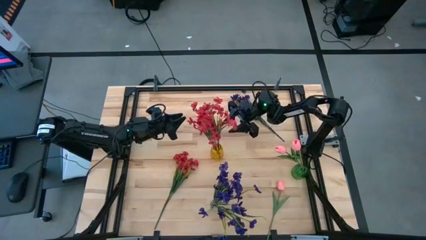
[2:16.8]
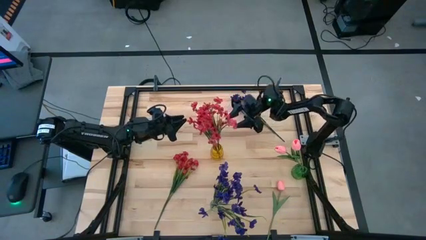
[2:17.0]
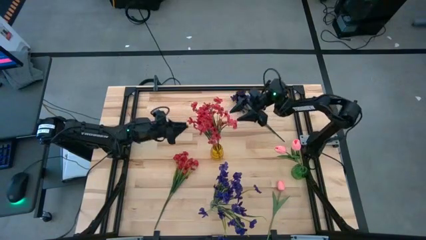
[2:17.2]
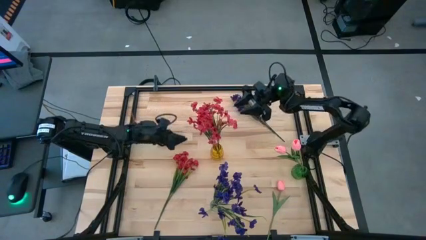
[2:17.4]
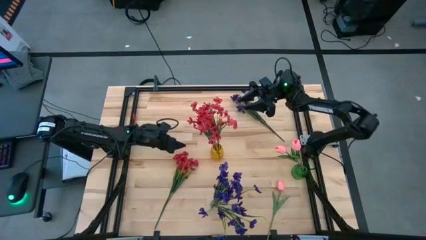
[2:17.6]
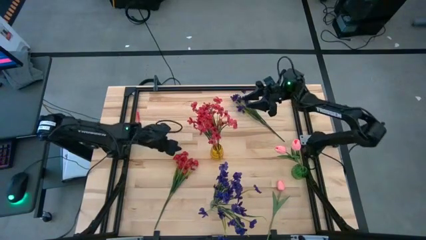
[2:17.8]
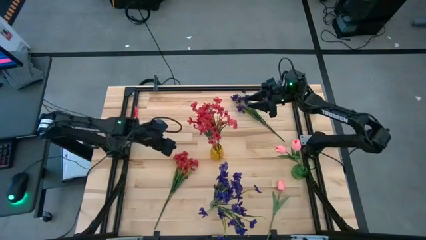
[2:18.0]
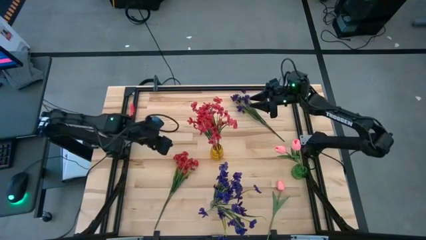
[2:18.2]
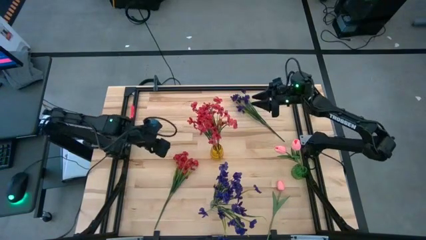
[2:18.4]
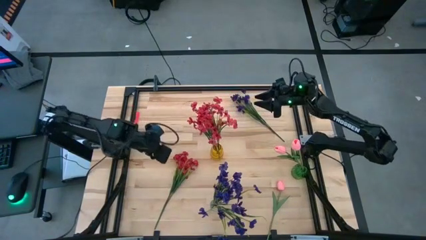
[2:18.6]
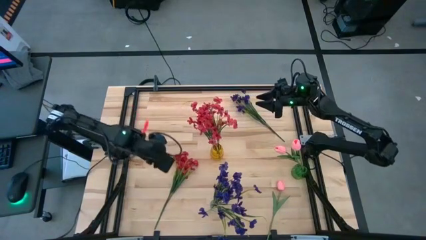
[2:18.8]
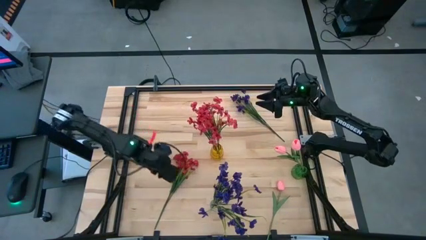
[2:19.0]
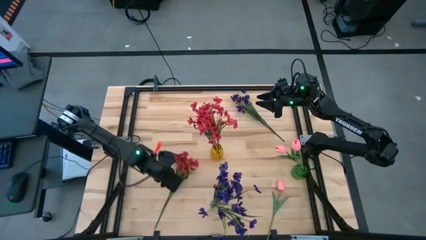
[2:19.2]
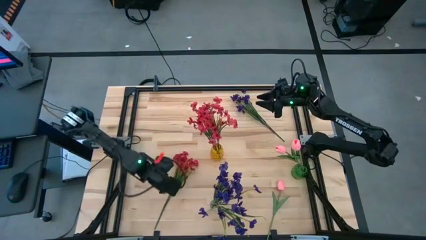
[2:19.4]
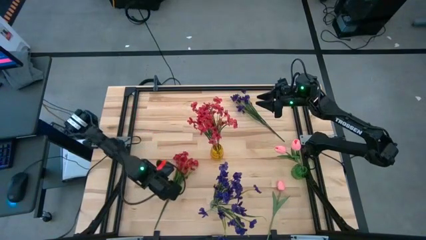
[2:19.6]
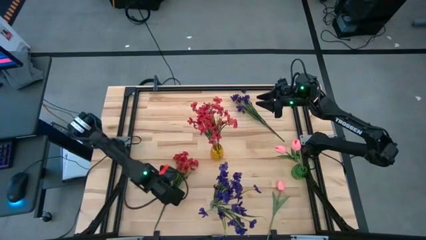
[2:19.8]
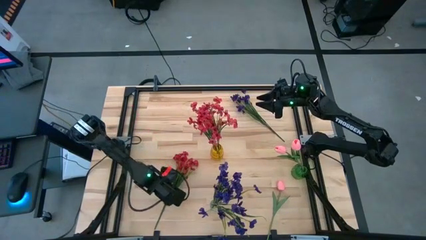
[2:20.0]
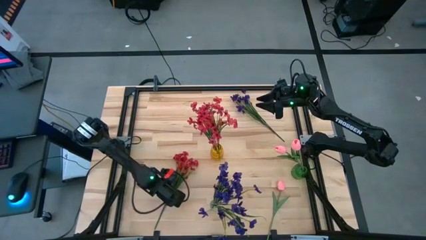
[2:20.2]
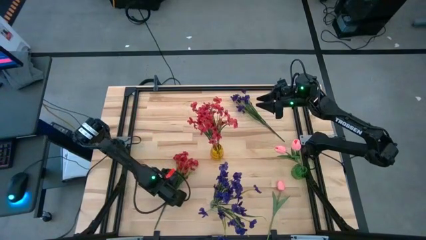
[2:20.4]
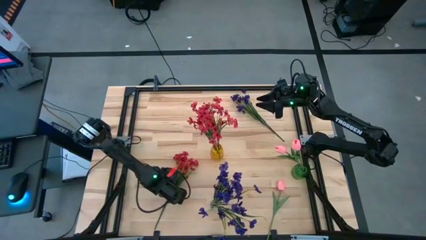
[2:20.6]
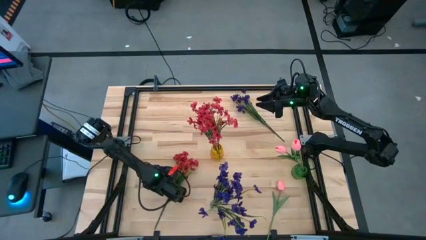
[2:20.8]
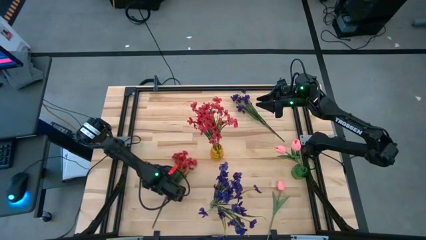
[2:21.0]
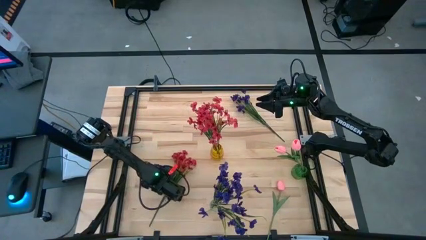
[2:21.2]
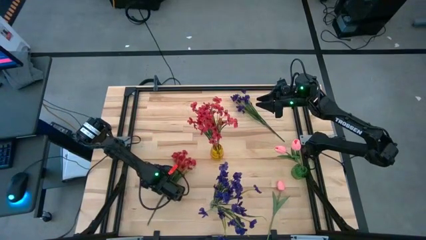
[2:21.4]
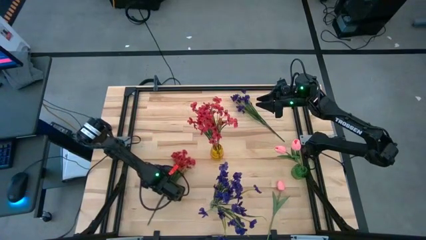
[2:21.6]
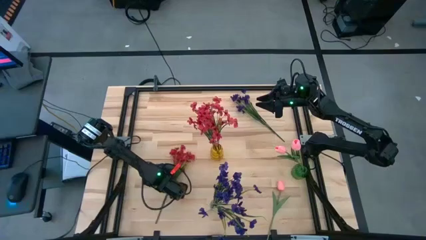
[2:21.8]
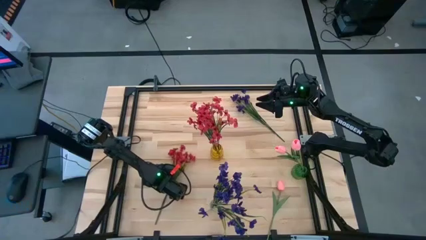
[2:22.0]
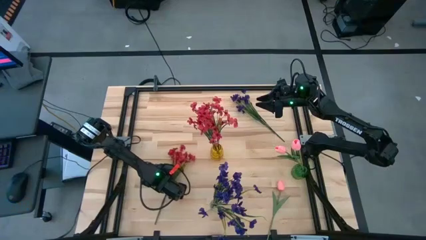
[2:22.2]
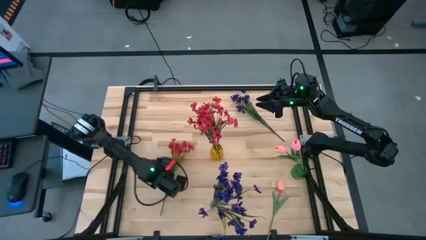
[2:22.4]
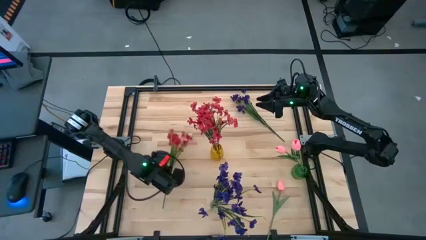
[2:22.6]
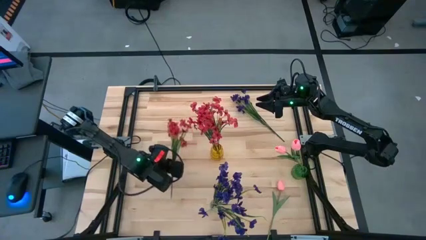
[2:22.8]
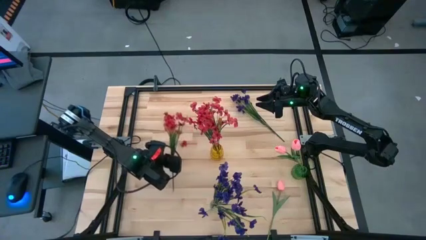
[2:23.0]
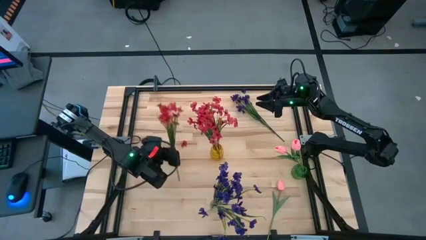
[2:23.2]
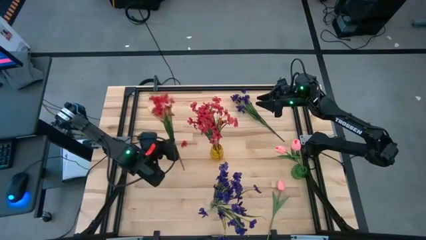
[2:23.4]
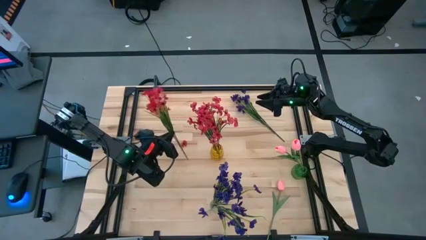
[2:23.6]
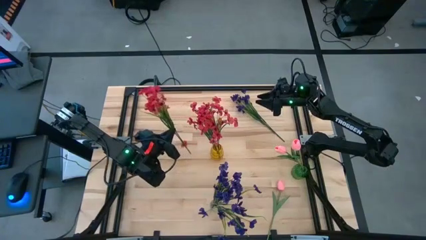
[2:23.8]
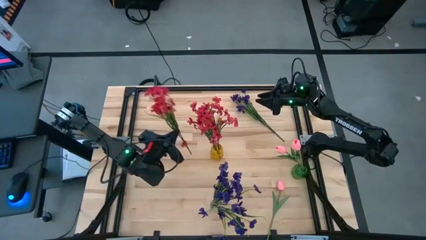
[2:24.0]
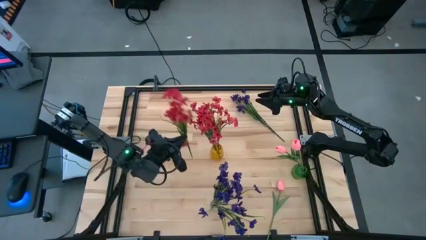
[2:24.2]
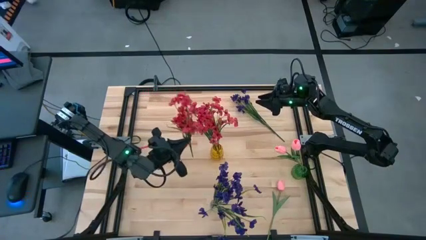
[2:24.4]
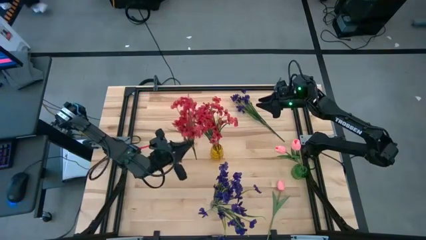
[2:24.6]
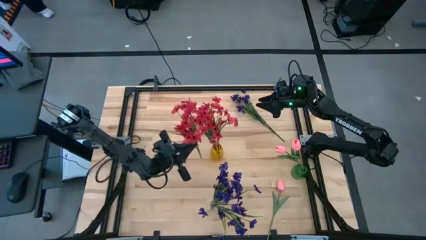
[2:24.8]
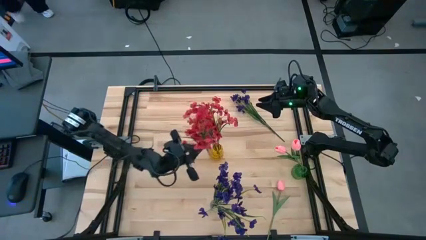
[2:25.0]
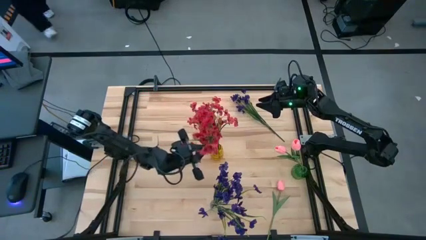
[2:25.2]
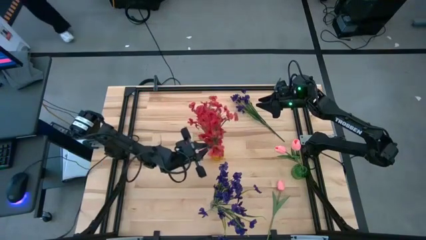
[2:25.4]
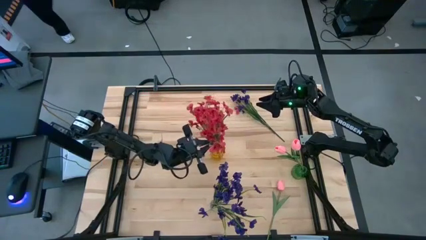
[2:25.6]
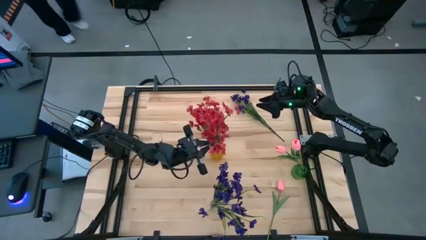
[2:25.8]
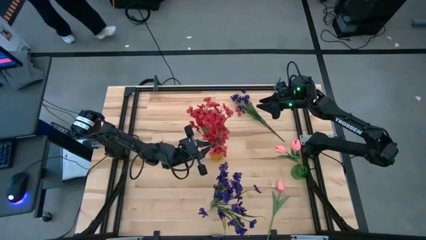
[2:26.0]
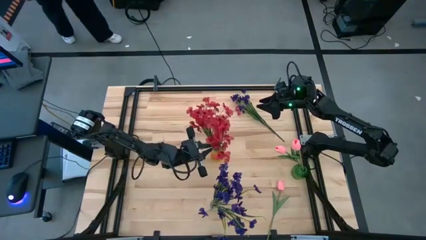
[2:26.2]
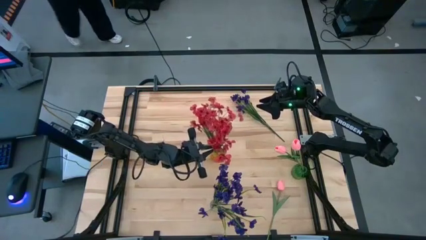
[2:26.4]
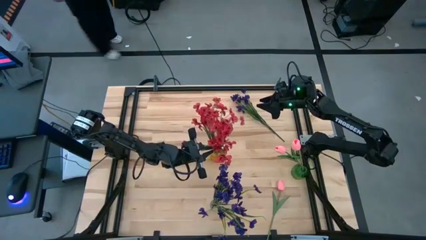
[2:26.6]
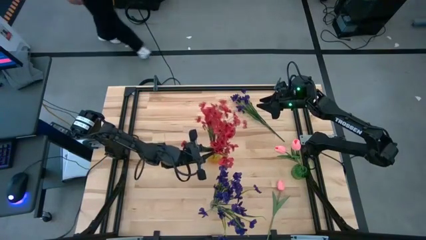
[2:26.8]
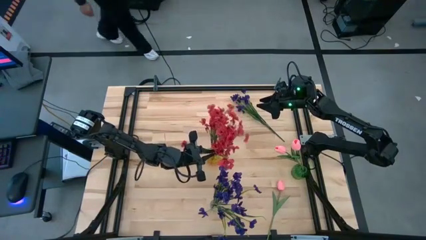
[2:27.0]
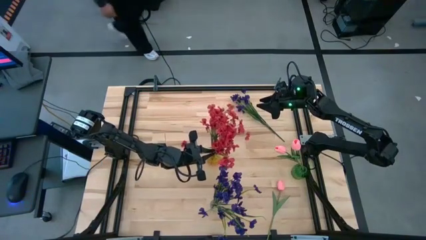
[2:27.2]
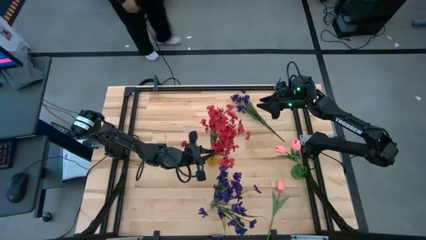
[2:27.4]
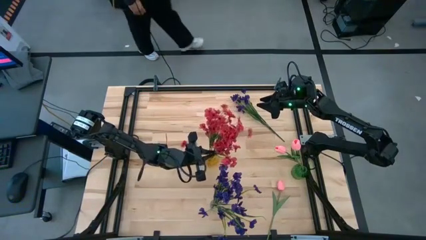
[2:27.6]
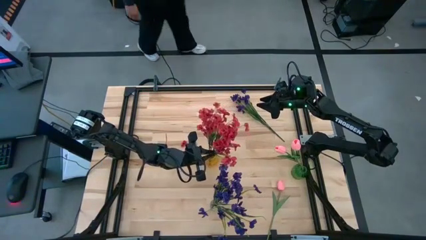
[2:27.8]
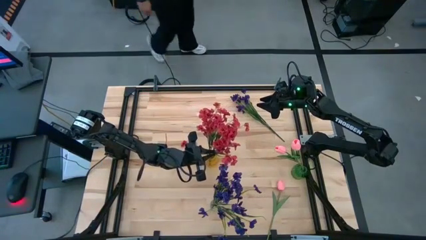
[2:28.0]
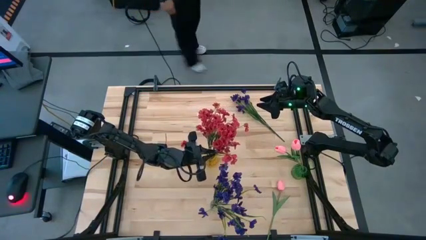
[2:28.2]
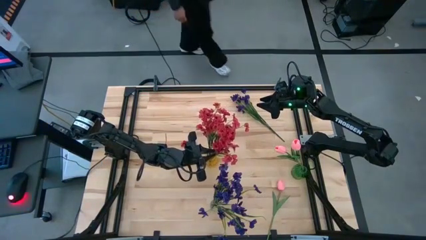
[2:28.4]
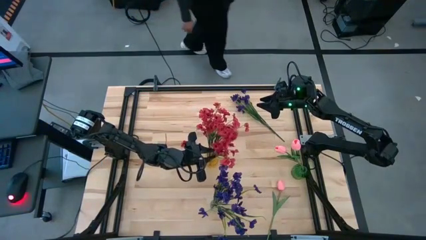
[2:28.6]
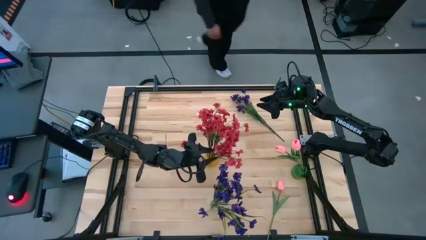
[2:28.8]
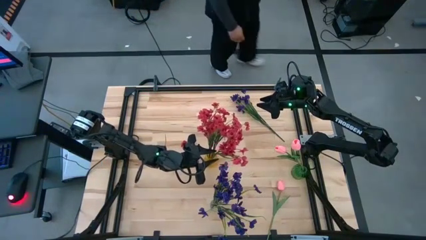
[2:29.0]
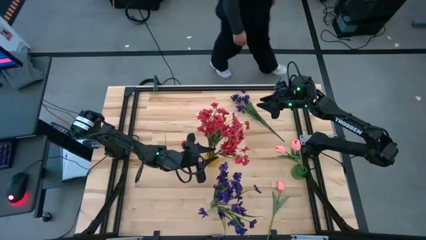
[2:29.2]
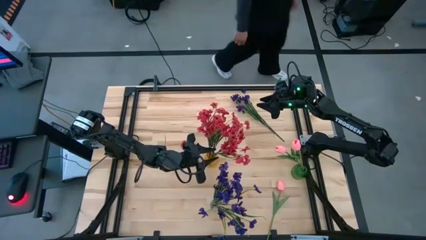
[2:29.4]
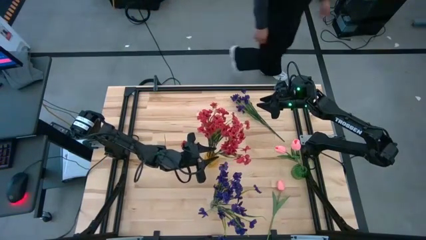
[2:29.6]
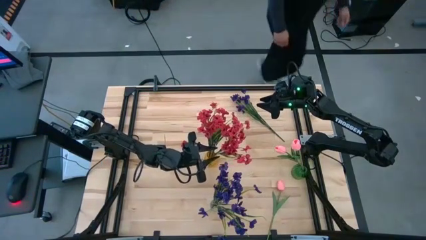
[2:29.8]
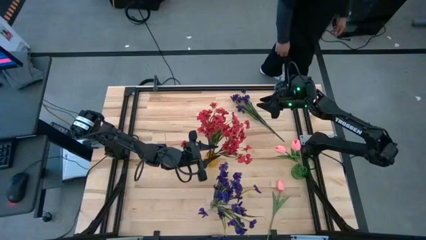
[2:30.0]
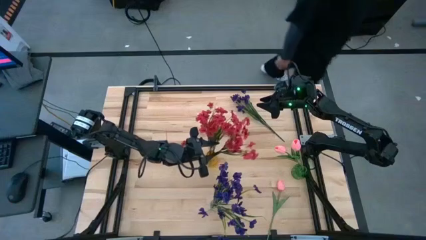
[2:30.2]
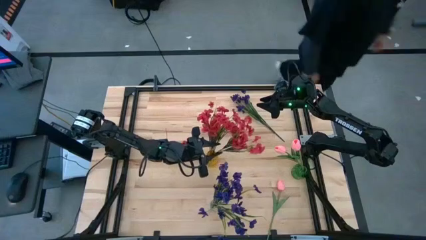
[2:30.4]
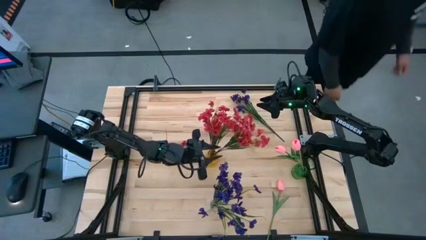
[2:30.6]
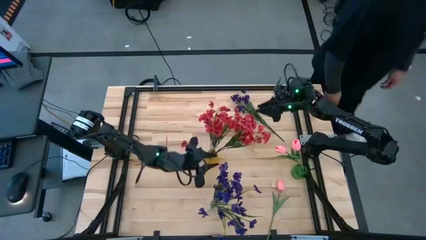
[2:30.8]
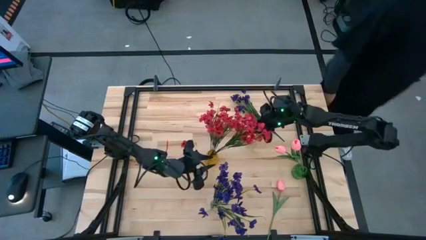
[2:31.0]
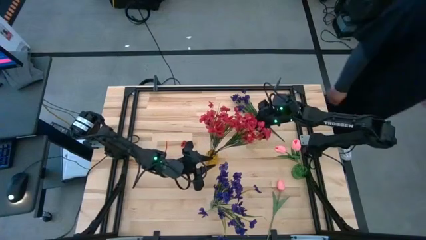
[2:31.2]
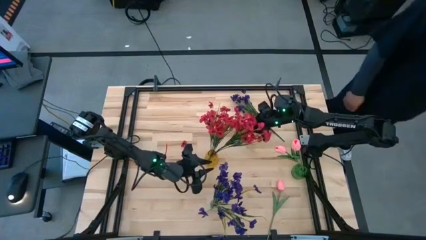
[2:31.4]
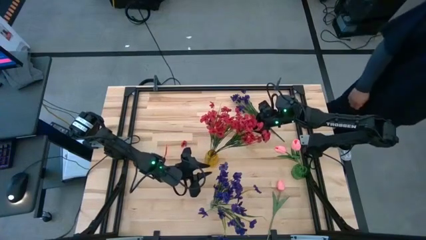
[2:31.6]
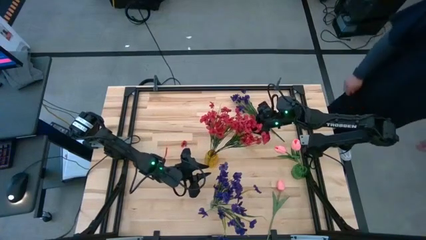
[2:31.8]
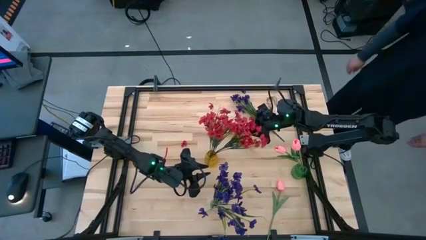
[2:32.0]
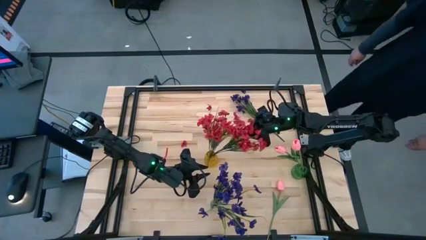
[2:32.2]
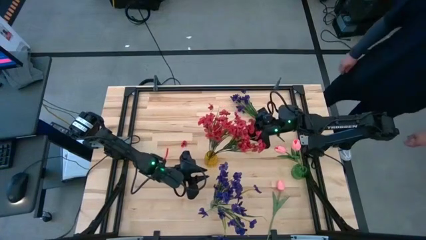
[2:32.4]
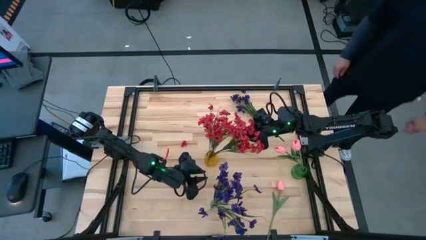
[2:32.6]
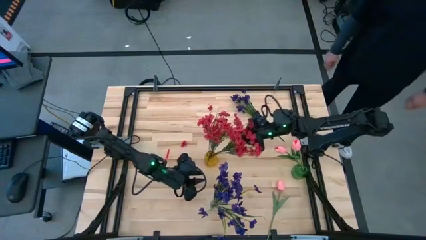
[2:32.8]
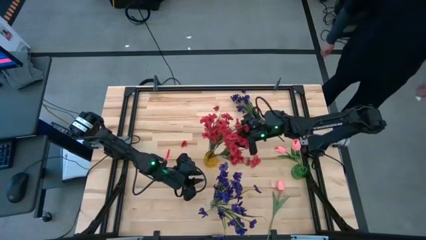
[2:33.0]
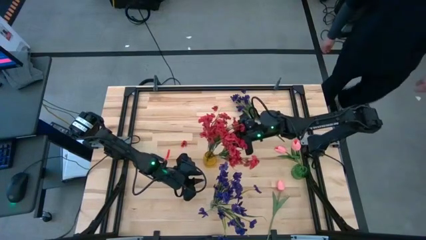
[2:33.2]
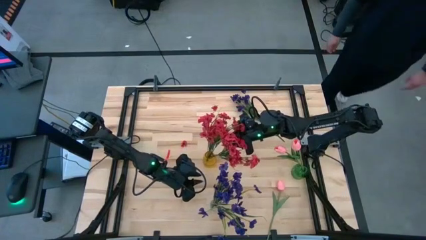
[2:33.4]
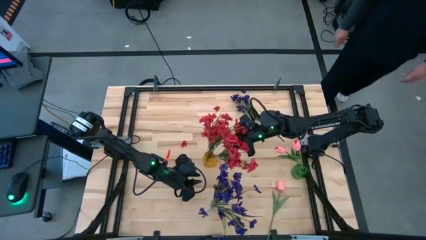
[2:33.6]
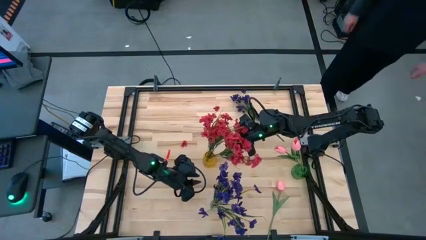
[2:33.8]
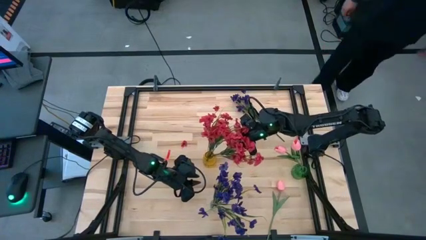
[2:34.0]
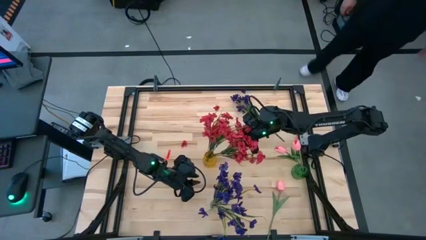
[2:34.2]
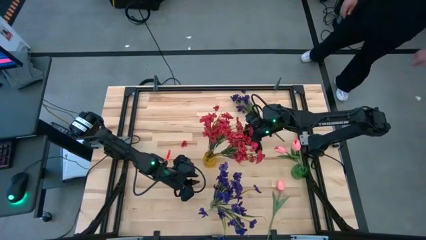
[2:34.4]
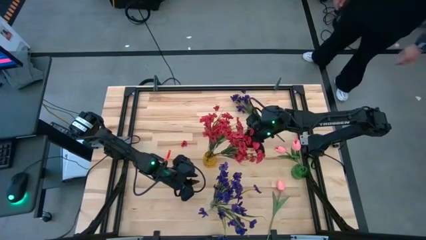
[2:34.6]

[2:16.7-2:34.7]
Task: Sort flowers into vase by color
Put the red flower into the yellow vase
